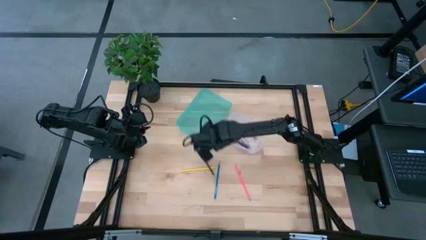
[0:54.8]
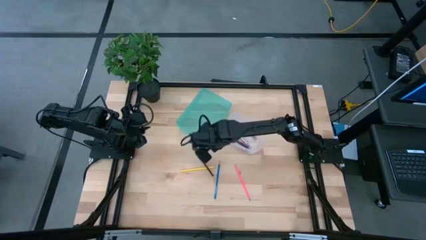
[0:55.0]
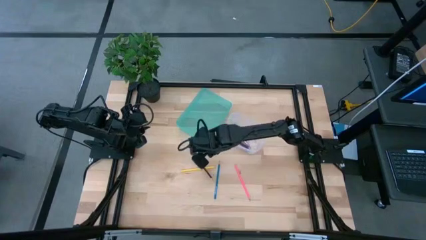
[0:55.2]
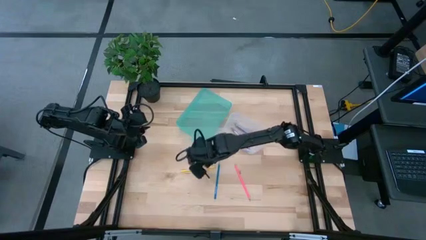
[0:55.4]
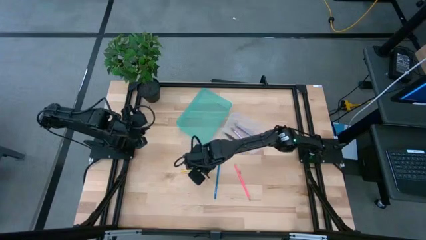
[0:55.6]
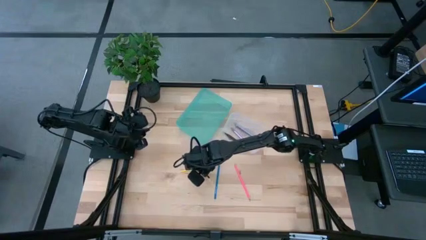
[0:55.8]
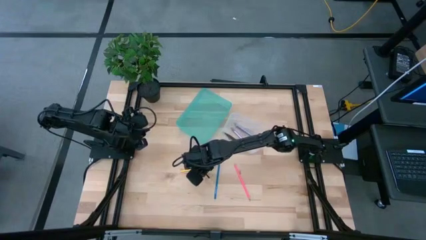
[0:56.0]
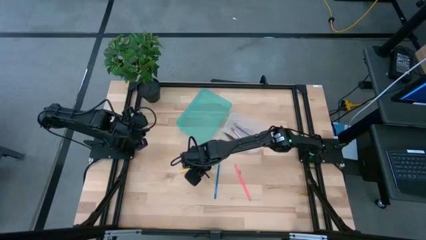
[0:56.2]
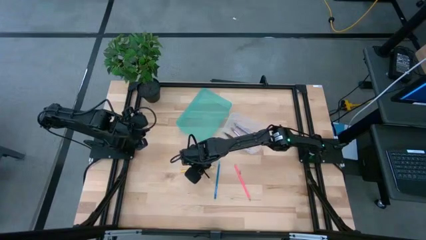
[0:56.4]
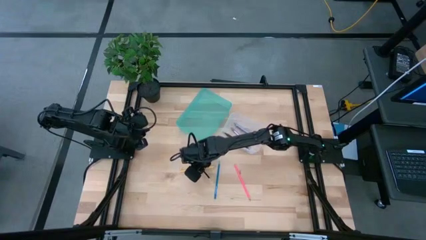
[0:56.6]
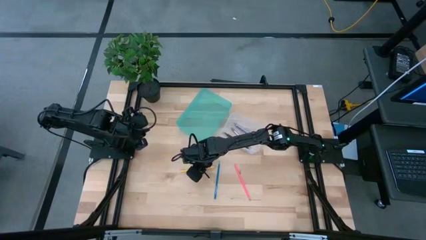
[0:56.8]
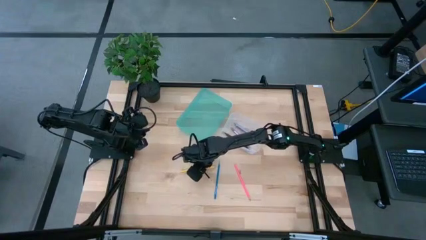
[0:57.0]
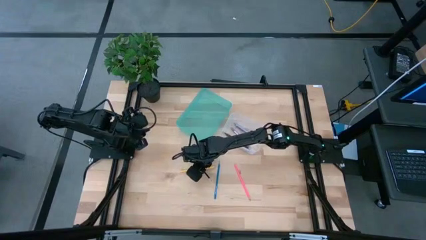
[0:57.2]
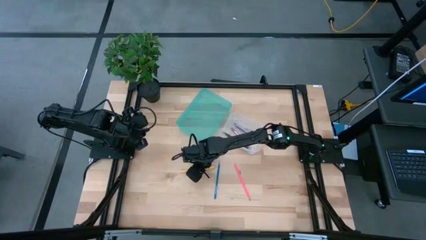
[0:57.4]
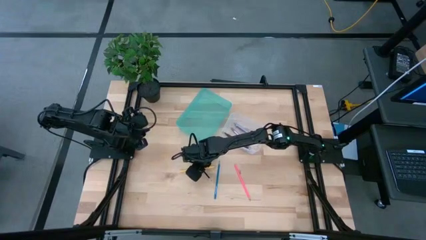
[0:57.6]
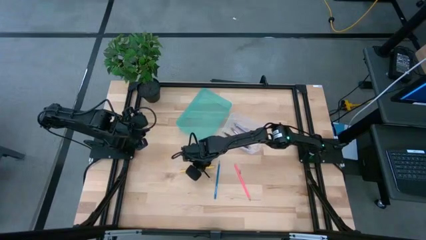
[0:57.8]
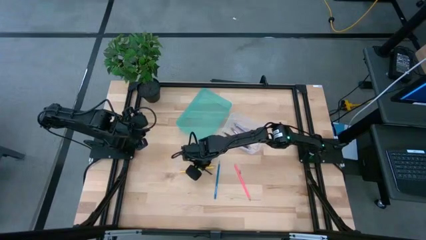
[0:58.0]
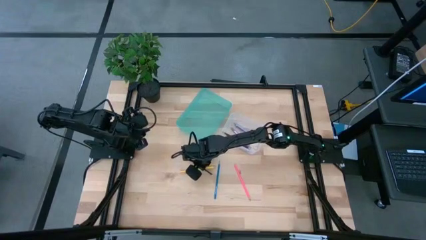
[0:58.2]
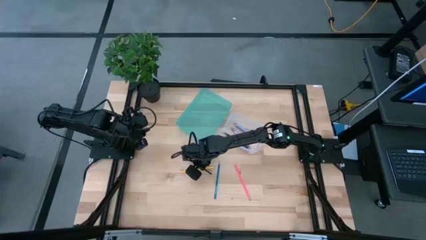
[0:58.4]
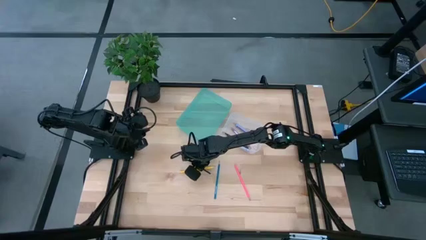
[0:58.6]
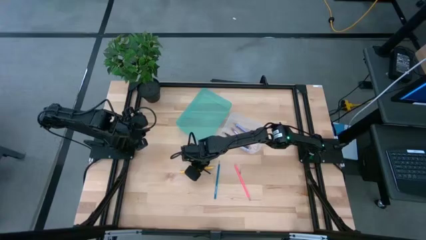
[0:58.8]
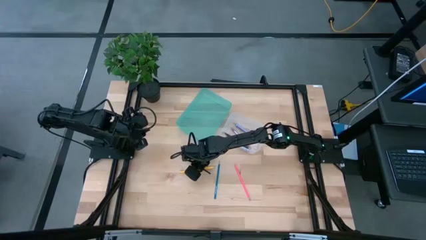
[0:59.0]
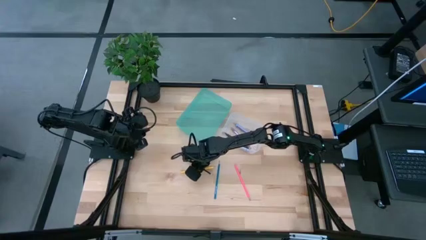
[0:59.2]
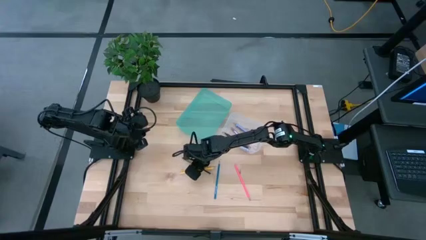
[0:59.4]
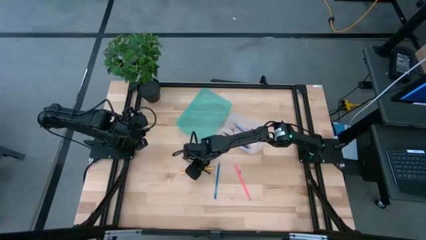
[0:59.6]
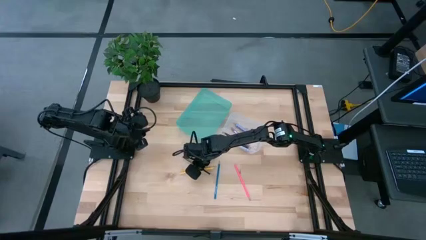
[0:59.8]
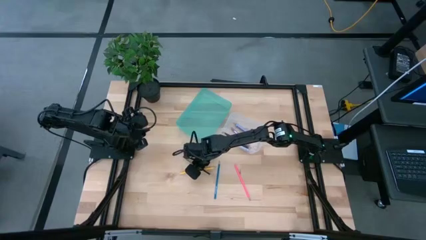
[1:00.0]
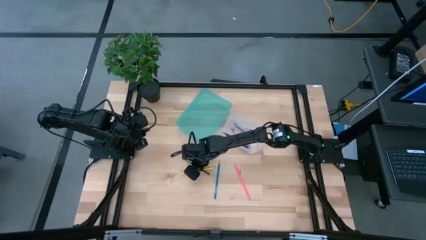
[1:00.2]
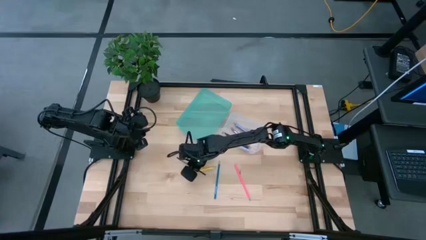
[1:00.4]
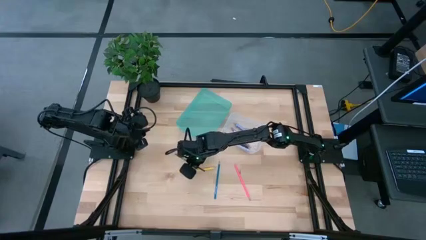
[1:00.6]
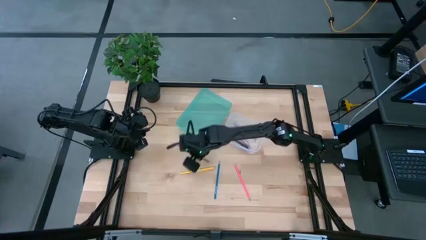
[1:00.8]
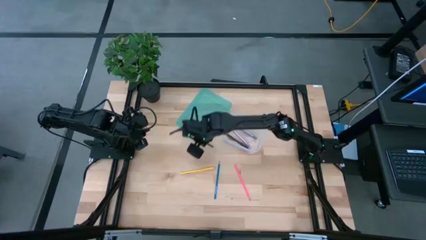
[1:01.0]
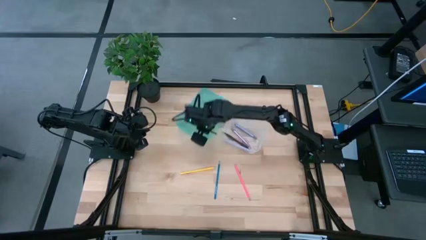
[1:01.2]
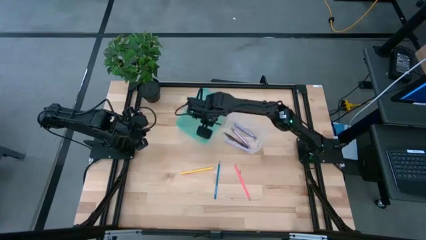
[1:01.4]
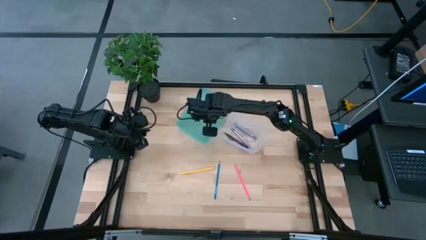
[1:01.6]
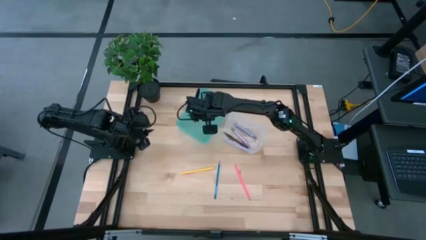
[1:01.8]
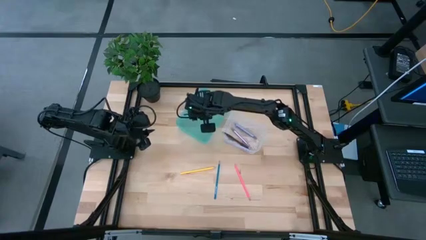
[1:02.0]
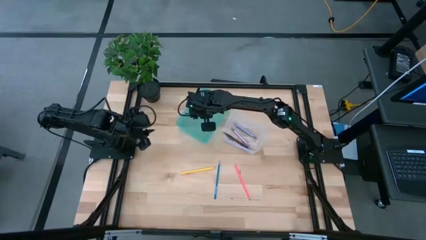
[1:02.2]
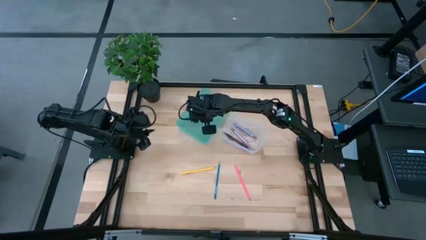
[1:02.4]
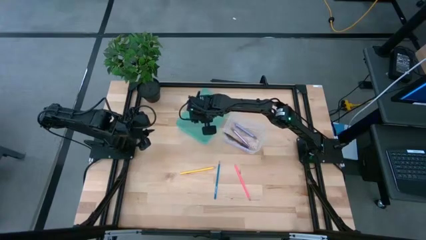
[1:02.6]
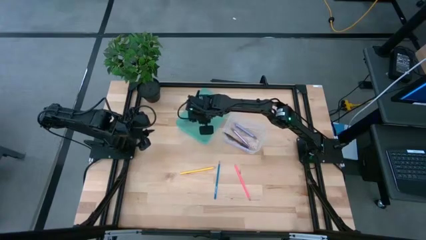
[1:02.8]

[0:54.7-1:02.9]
Task: Sort pens & pencils
Put the black pencil into the blue bin

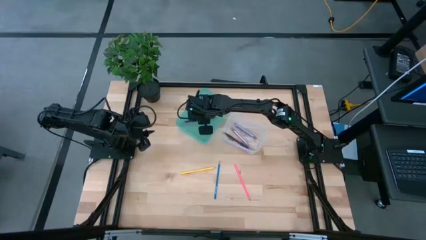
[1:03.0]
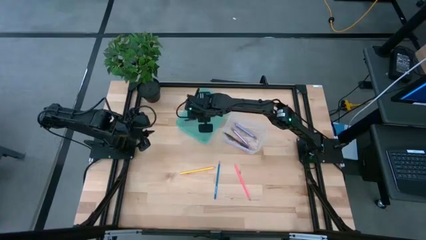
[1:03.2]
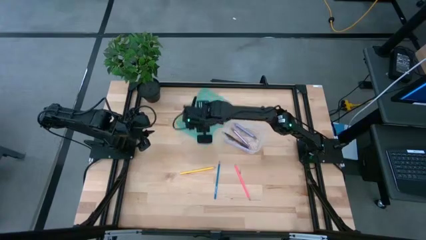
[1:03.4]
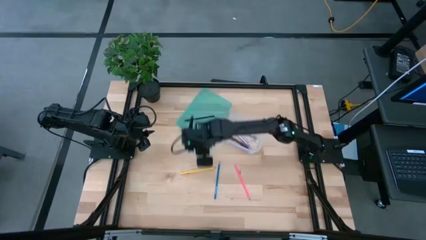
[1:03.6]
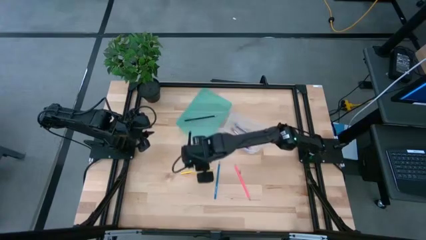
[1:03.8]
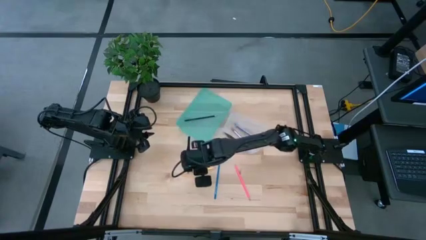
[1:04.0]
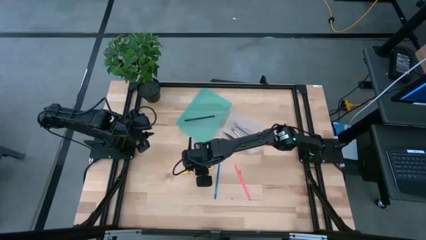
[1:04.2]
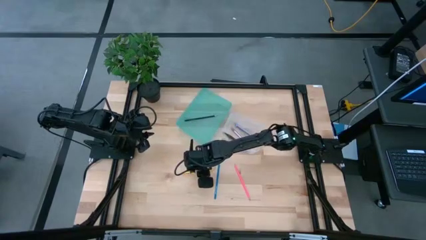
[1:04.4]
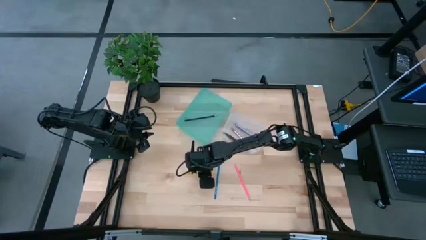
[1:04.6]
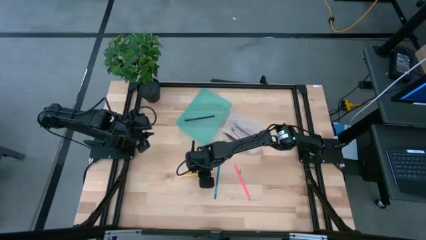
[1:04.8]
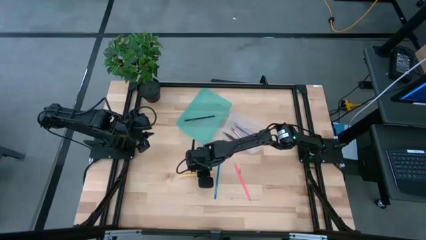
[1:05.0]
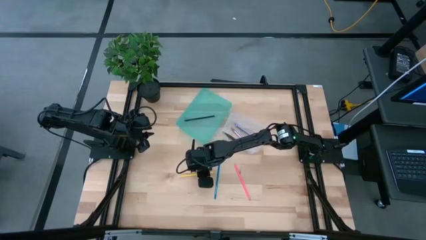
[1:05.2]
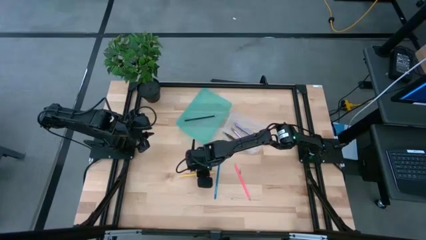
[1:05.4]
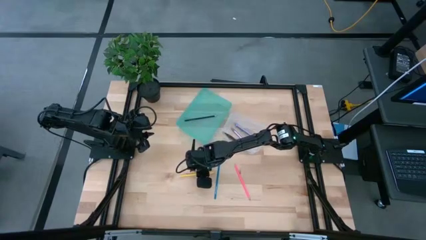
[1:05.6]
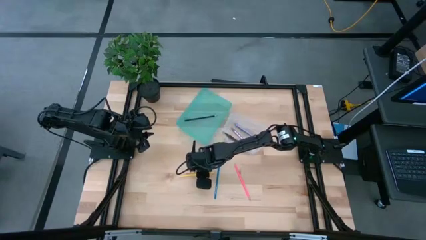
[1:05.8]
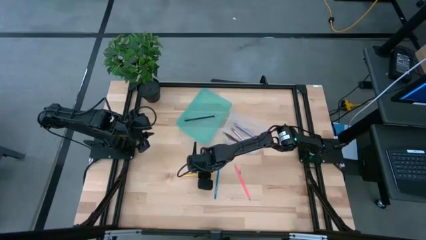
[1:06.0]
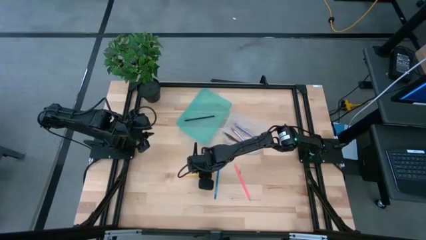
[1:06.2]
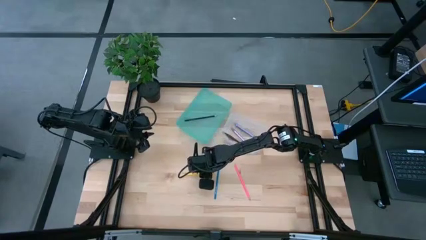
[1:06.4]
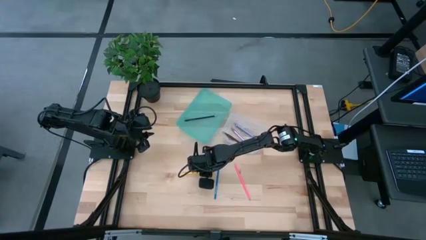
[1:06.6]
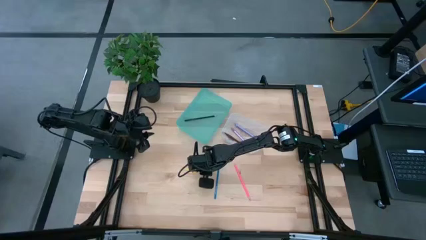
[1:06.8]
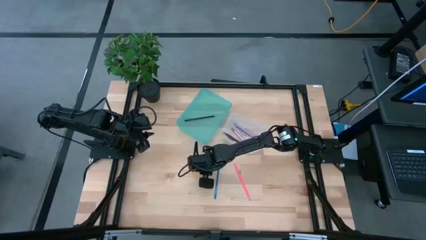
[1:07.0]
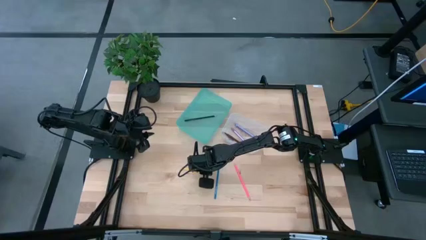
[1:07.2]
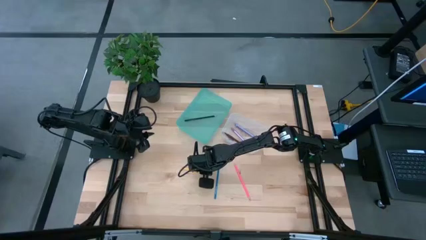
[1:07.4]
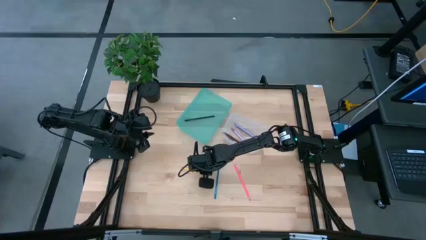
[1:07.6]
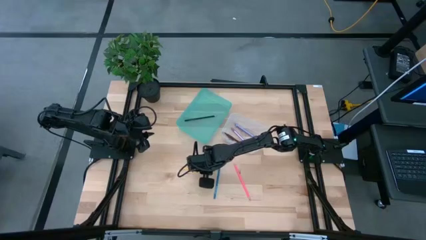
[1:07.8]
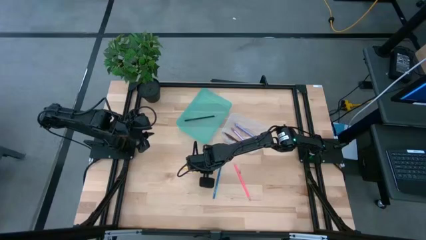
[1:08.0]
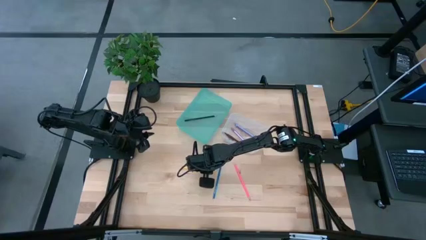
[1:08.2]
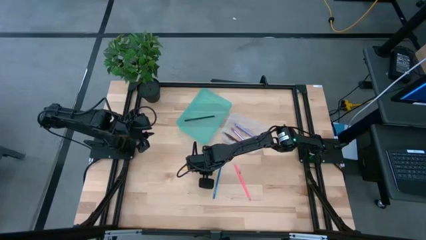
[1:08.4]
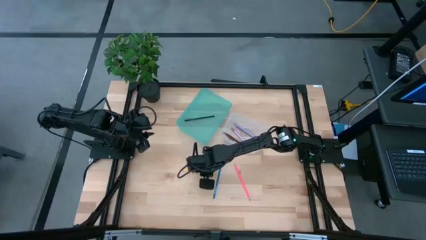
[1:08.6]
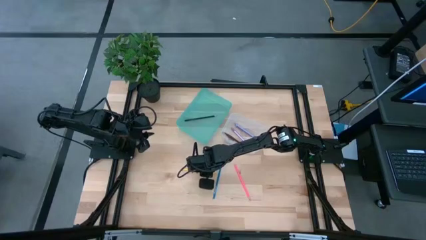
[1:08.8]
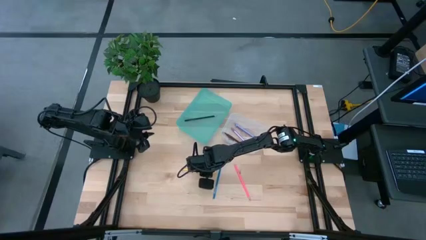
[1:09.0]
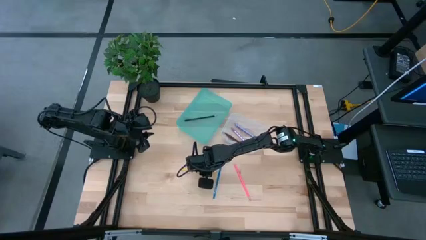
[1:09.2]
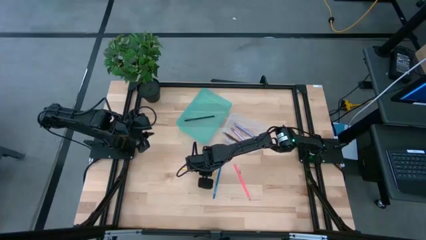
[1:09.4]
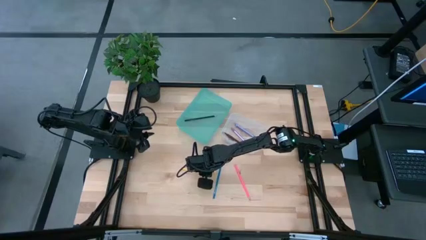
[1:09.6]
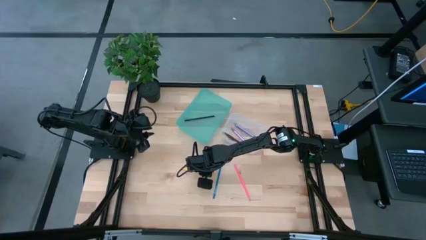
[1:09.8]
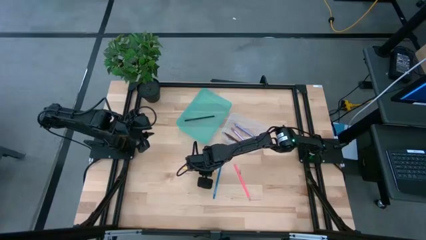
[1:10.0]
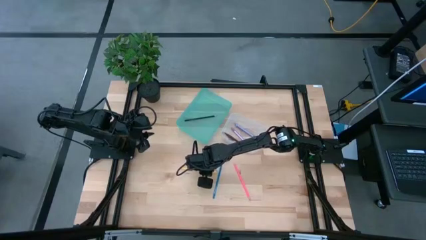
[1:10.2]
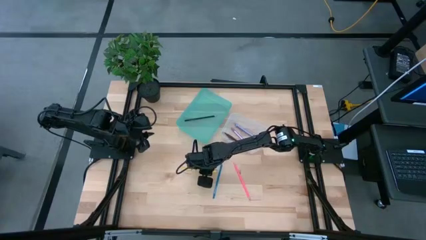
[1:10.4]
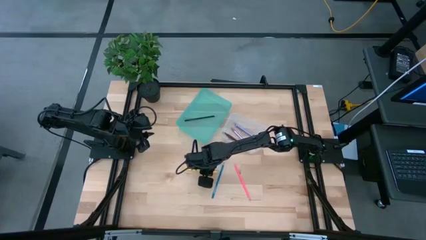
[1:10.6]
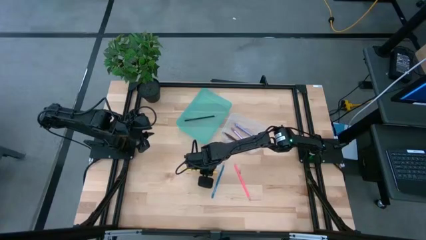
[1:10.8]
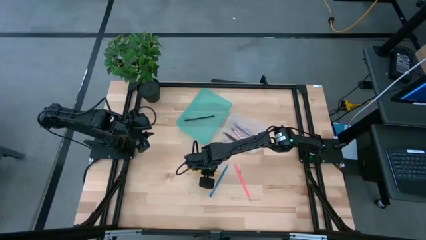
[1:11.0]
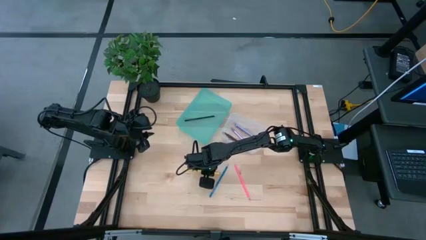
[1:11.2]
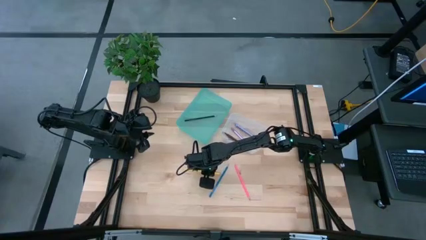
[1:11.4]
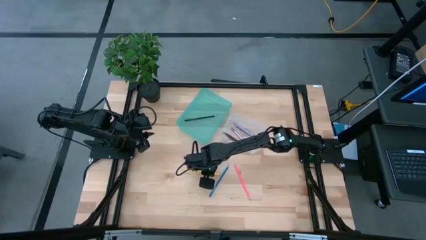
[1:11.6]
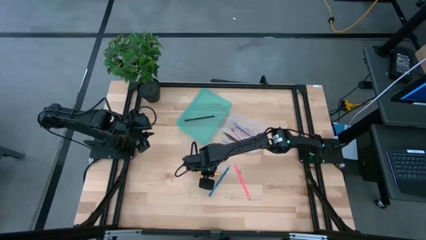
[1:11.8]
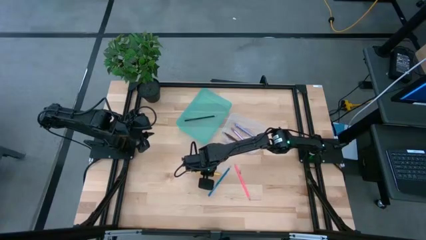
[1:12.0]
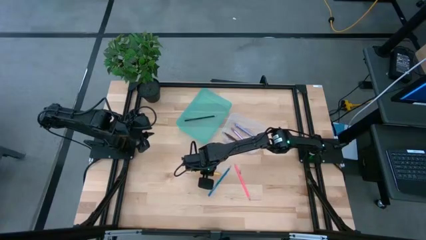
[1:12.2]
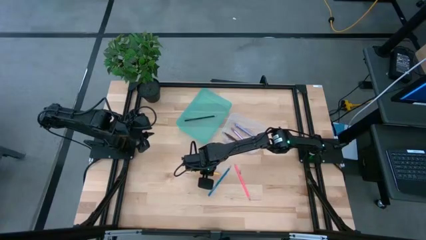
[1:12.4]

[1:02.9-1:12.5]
Put the yellow pencil into the blue bin
